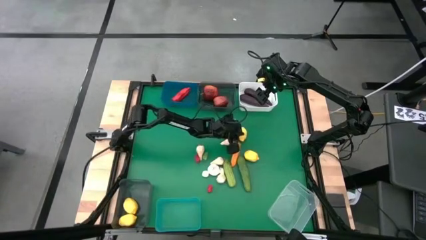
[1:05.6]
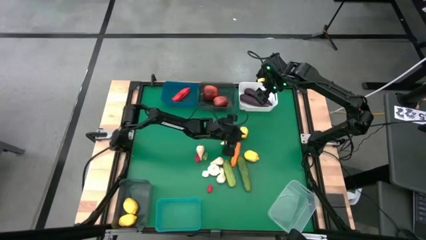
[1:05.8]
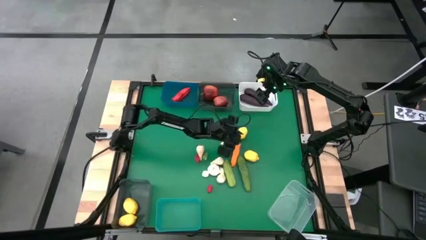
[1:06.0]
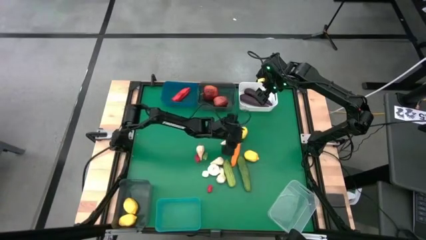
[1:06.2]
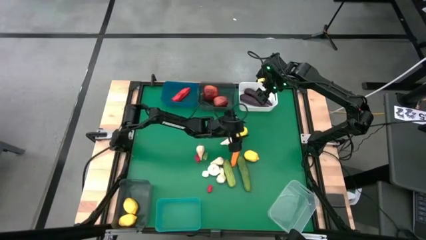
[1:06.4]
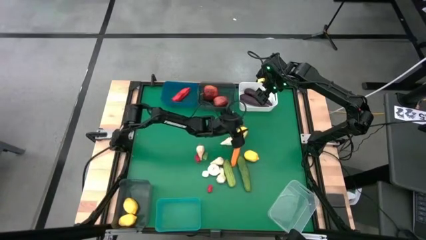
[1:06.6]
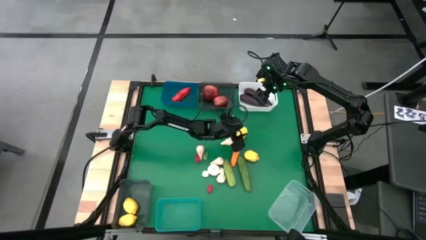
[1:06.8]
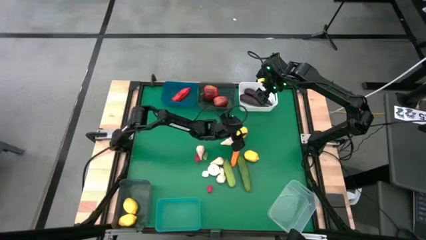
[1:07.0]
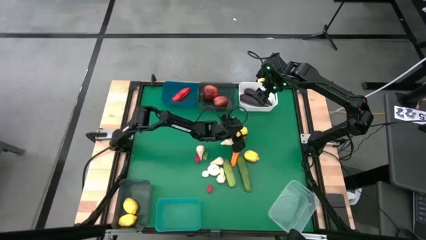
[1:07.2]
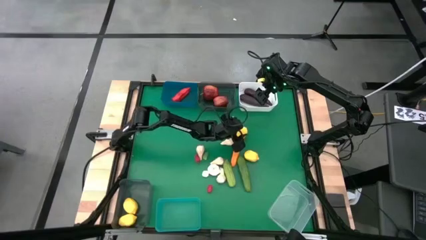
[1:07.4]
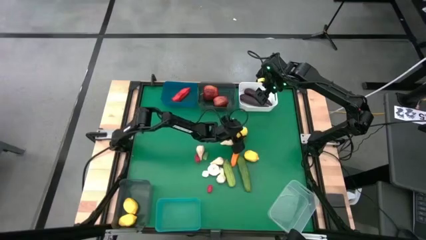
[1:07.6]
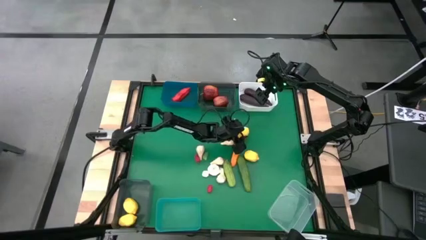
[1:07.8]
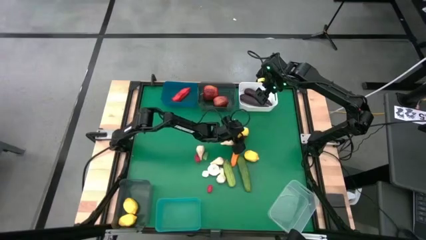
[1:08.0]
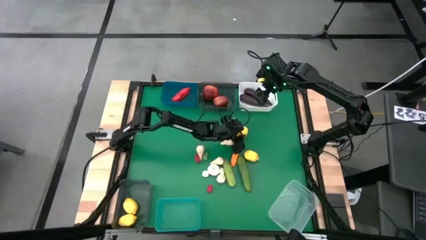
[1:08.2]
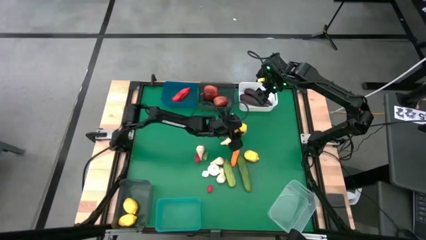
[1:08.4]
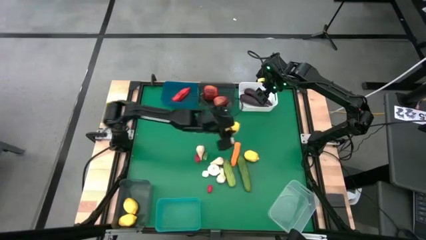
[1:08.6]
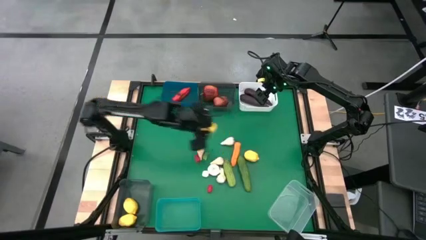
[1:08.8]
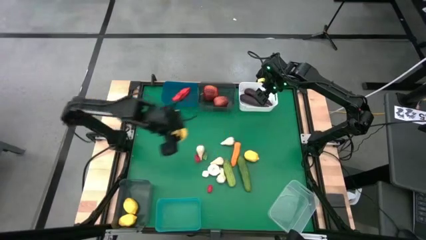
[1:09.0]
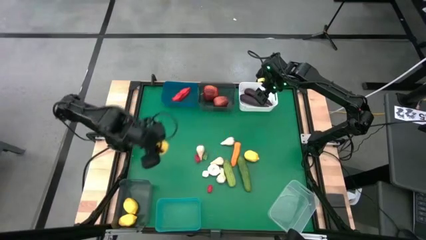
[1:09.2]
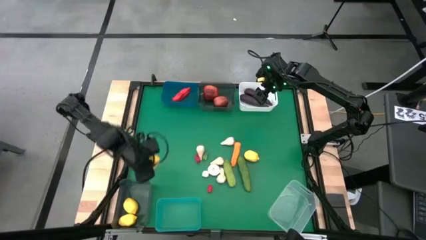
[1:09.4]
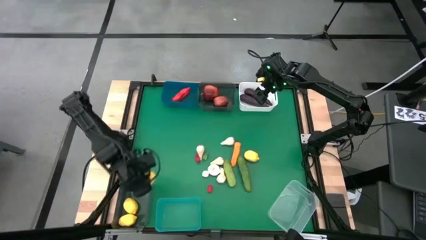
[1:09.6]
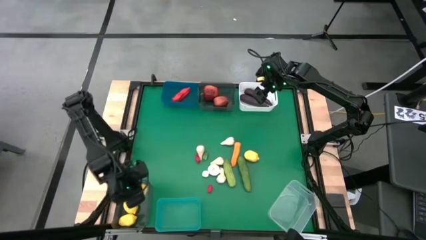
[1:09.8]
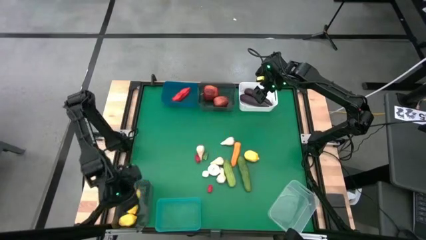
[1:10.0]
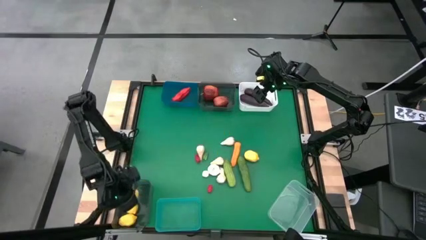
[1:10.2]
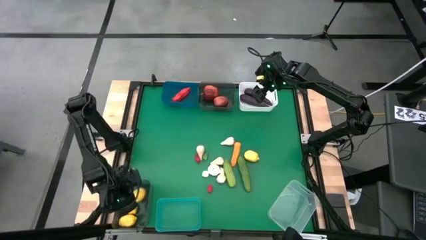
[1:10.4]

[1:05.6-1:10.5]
Task: Sort produce into baskets
Put the yellow lemon into the bottom black bin

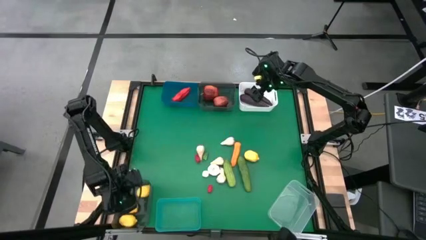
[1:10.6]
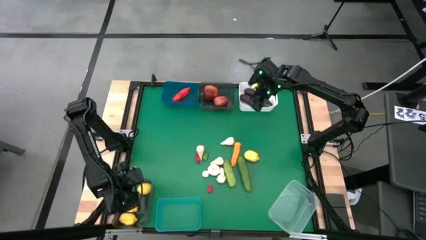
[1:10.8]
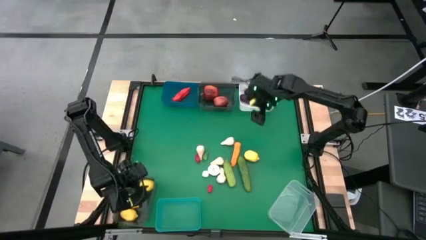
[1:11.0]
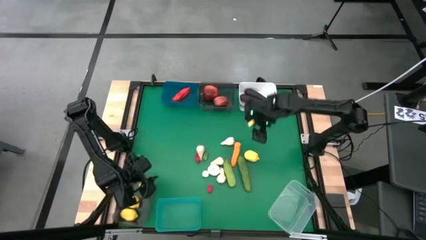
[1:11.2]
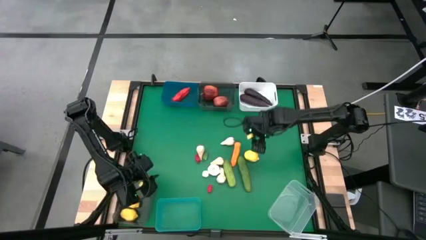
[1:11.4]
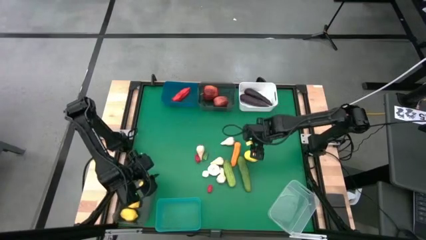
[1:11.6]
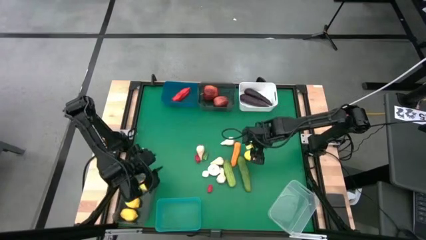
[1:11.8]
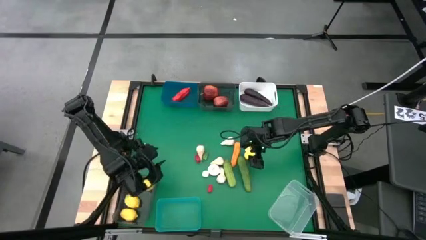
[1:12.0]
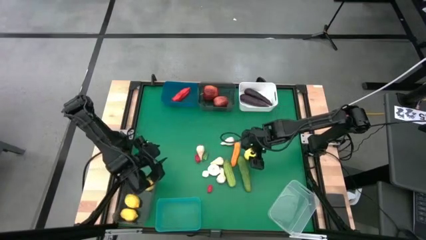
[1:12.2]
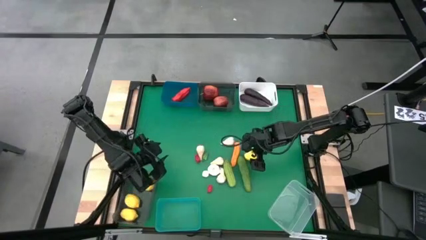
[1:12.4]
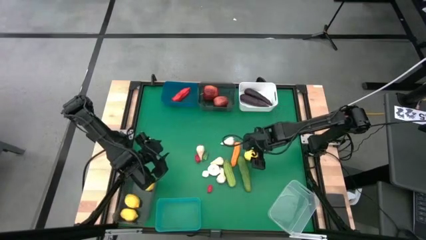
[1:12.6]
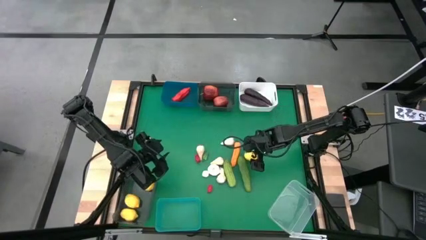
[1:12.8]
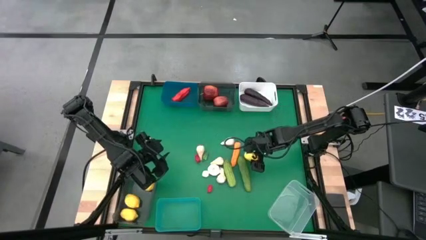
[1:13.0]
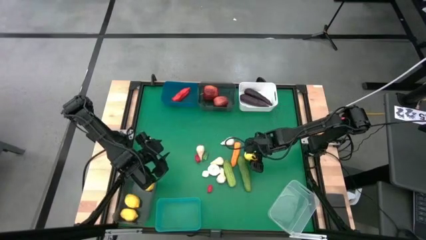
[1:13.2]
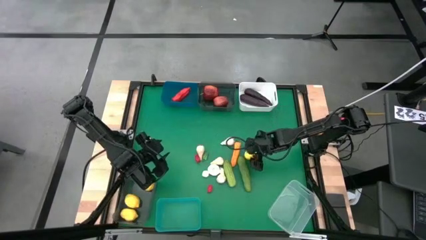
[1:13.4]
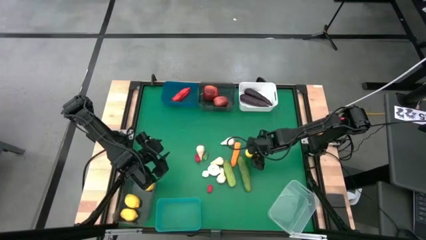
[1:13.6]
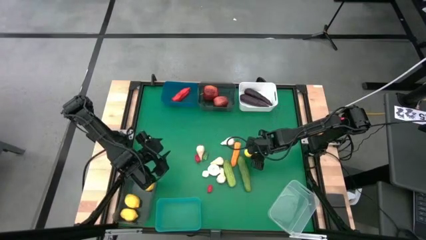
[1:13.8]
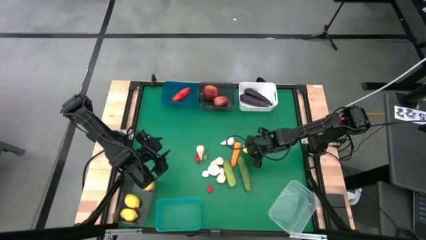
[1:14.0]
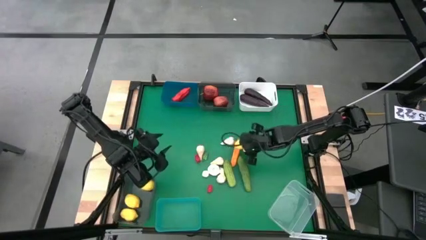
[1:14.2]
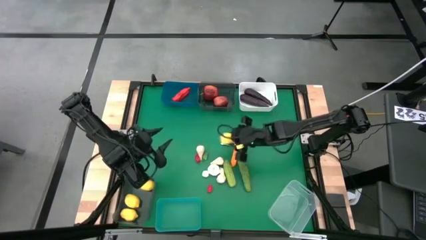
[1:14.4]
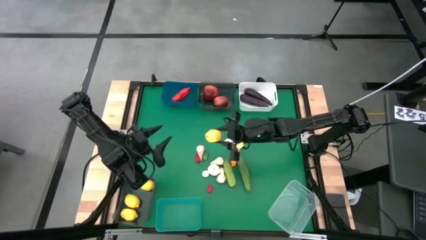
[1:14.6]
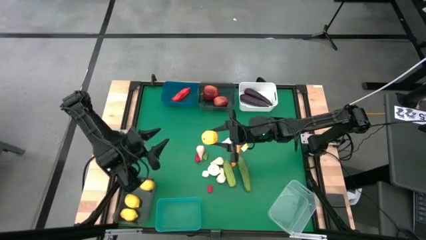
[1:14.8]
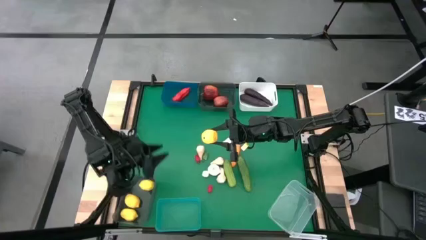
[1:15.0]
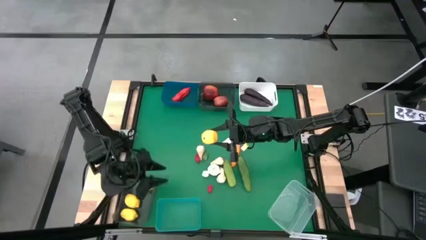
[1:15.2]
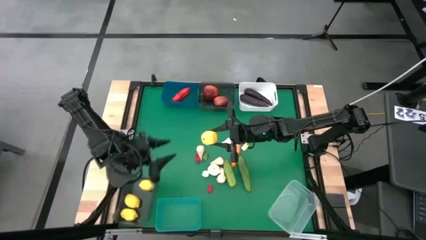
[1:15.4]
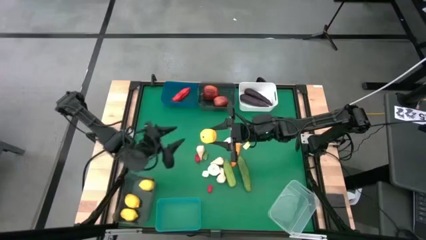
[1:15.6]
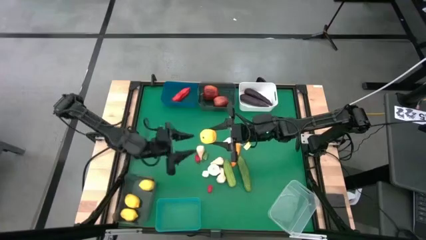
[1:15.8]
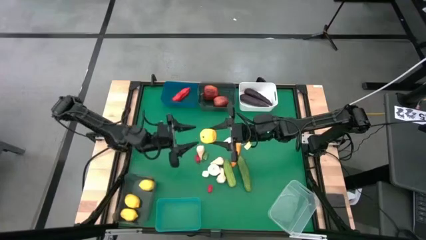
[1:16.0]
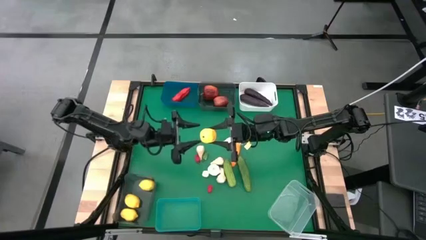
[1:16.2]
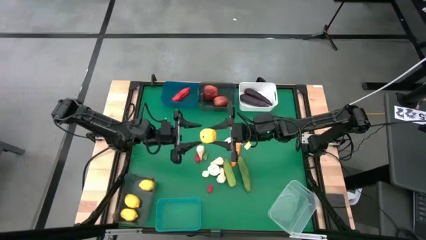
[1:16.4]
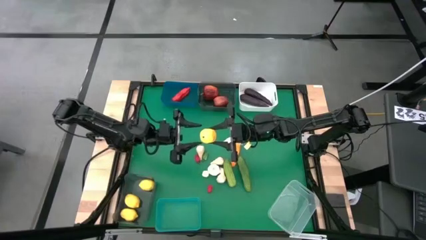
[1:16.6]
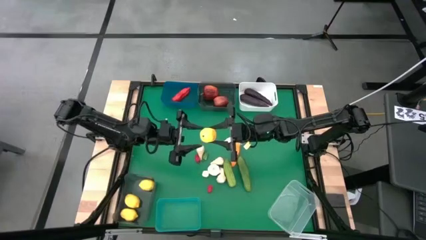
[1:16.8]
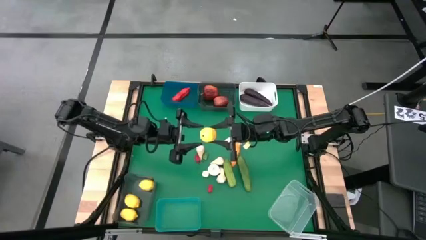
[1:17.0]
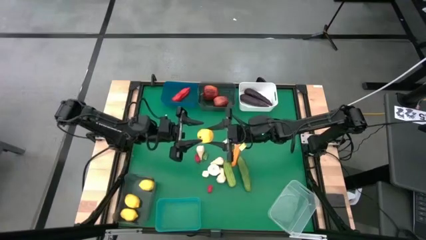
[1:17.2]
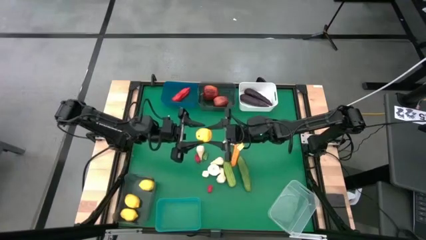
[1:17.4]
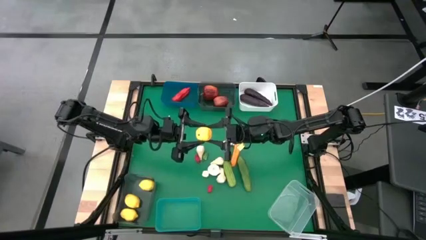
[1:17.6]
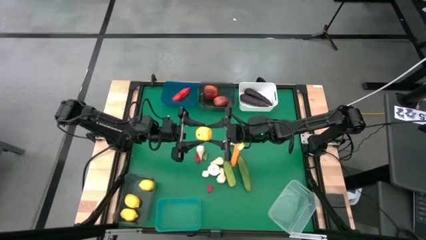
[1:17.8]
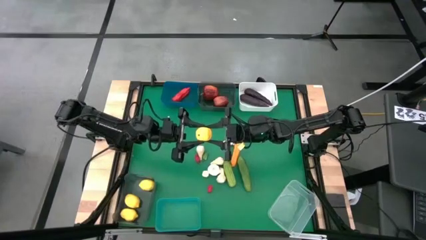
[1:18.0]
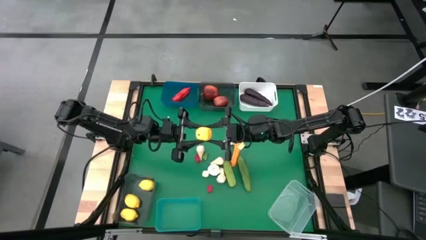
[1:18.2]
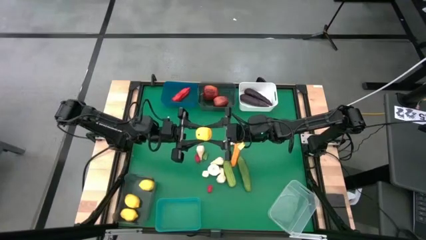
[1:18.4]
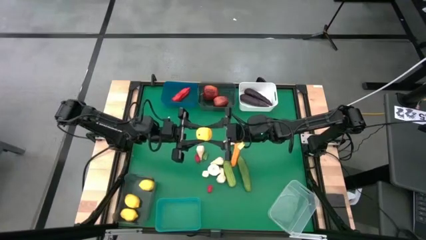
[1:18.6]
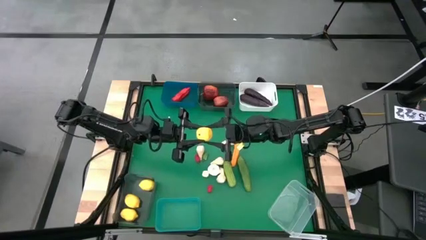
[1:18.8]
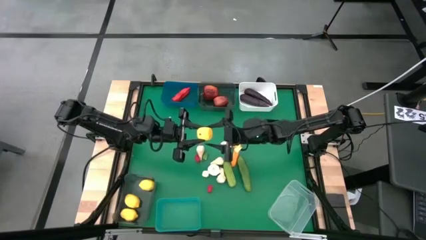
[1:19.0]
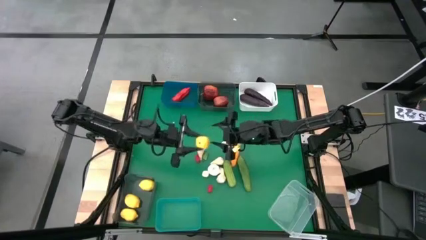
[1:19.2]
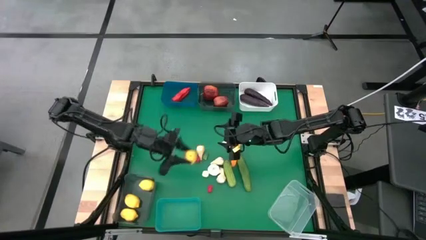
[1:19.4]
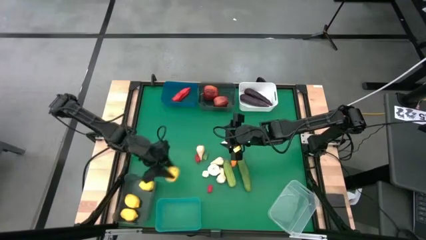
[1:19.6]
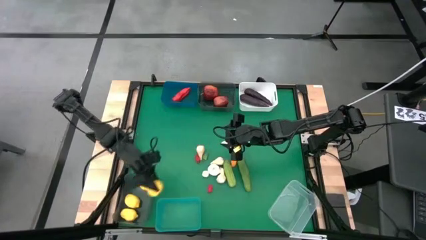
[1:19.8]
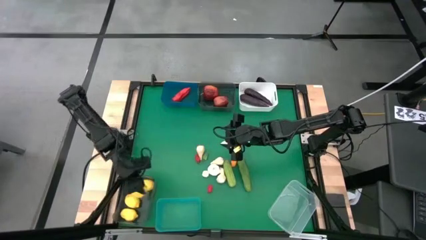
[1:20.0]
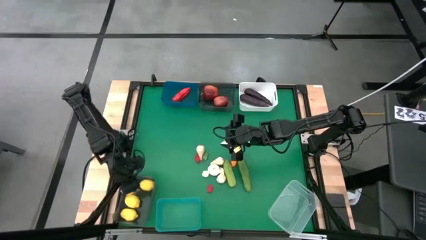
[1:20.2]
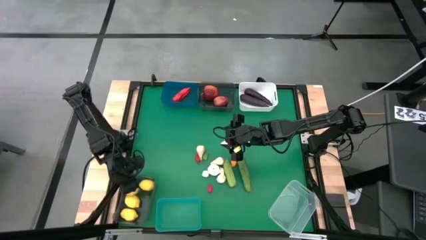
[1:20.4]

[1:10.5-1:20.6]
Put the yellow lemon into the bottom black bin

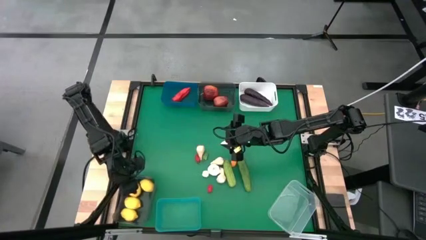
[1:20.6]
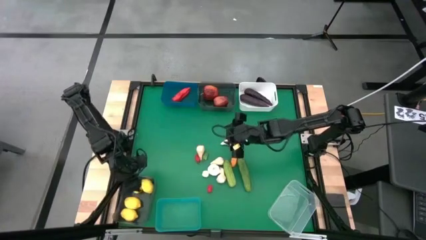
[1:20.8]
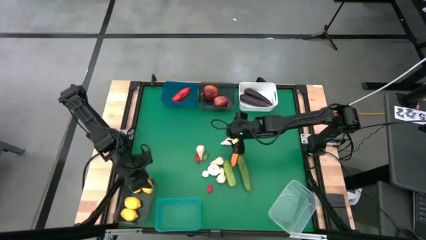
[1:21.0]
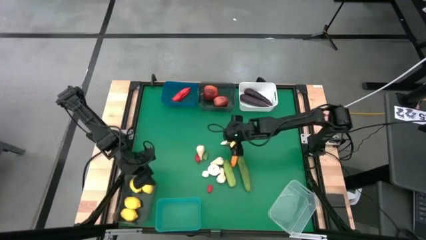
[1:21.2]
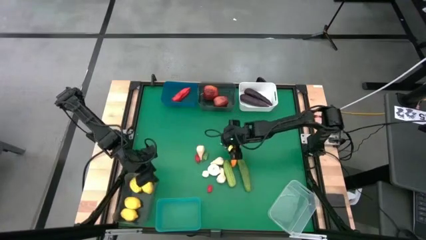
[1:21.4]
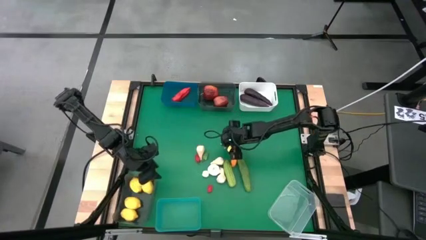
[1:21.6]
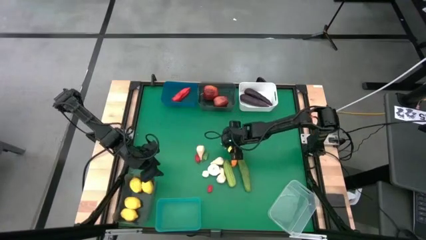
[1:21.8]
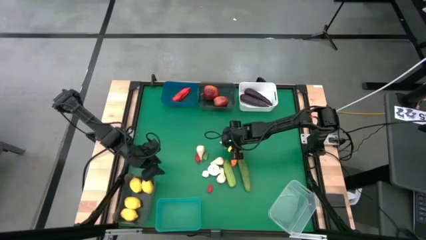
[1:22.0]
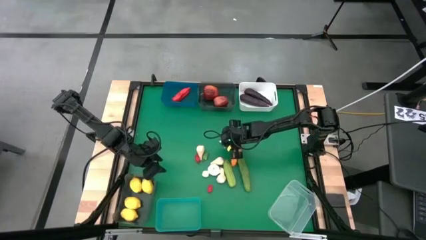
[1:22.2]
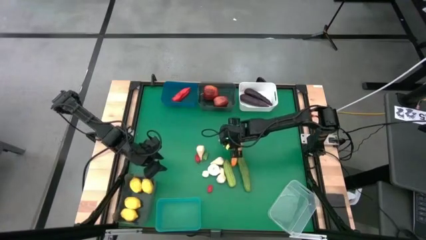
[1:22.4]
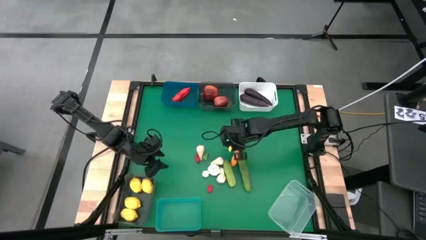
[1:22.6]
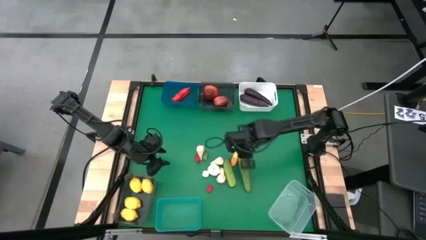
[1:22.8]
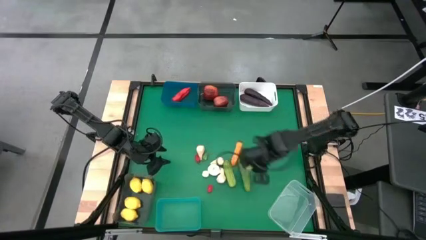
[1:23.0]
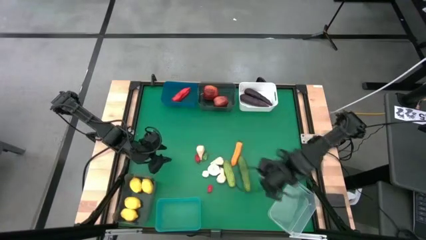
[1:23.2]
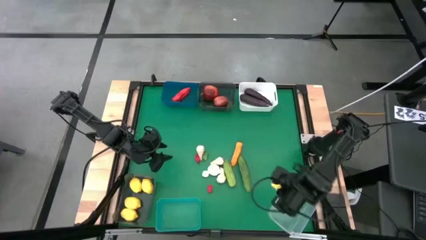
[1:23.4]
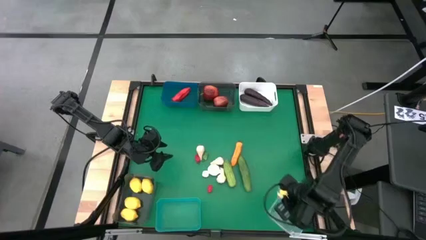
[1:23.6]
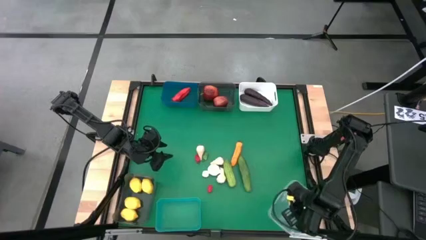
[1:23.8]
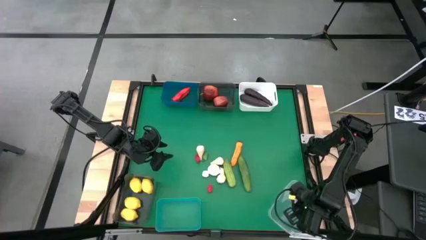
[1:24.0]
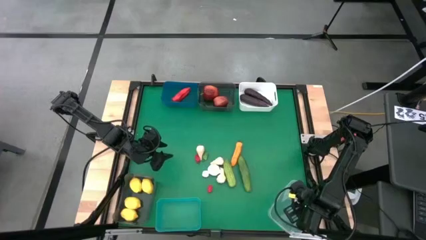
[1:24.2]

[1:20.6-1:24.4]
Put the white garlic into the transparent bin
